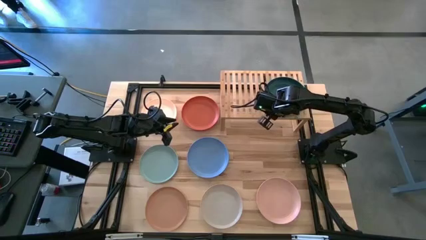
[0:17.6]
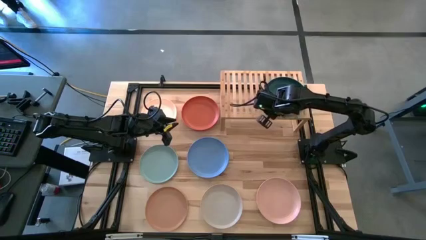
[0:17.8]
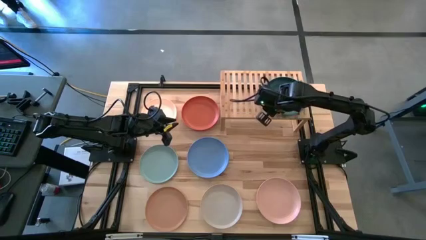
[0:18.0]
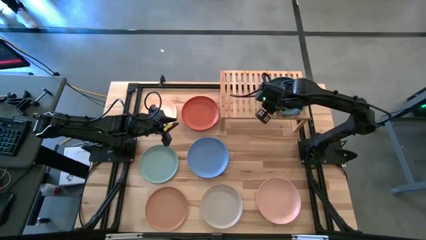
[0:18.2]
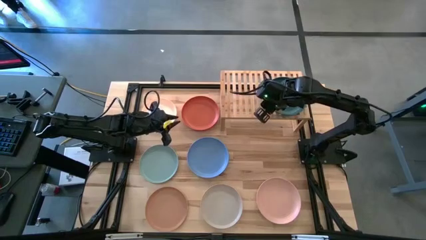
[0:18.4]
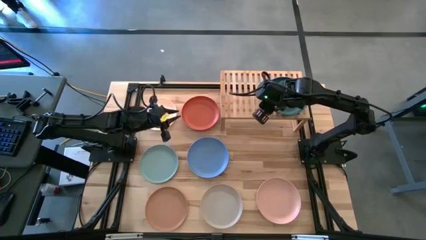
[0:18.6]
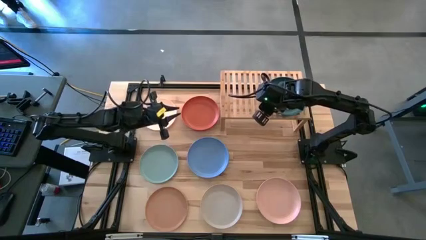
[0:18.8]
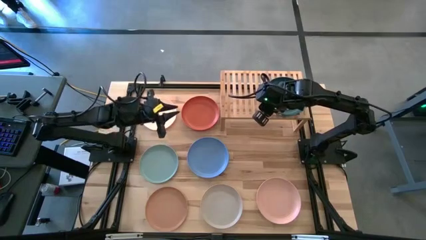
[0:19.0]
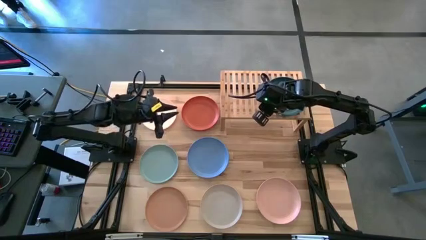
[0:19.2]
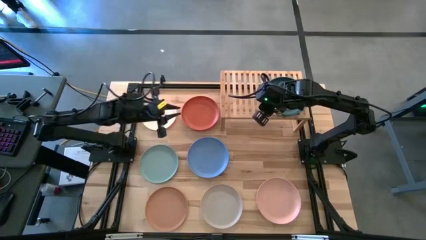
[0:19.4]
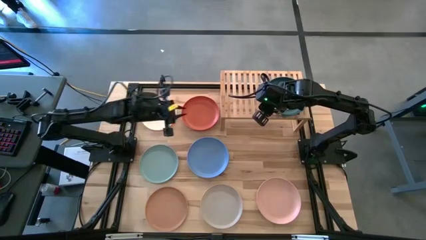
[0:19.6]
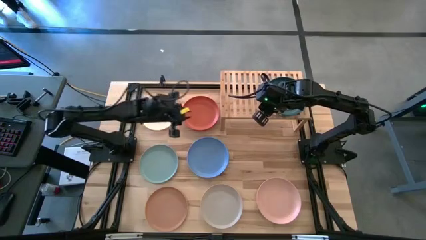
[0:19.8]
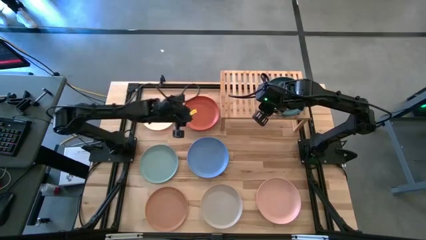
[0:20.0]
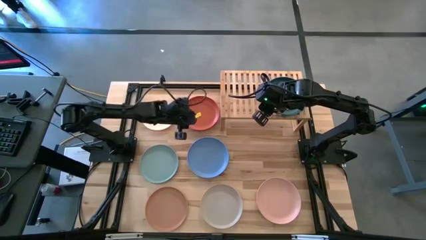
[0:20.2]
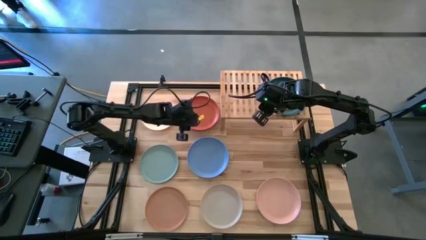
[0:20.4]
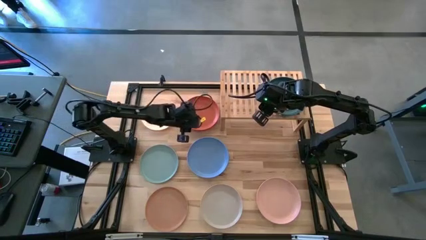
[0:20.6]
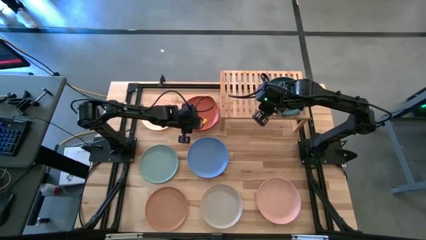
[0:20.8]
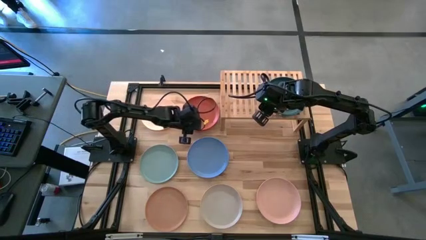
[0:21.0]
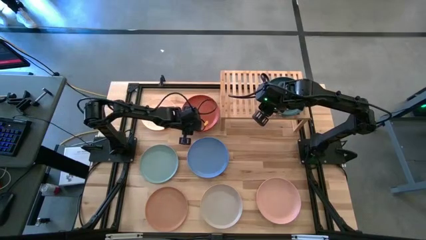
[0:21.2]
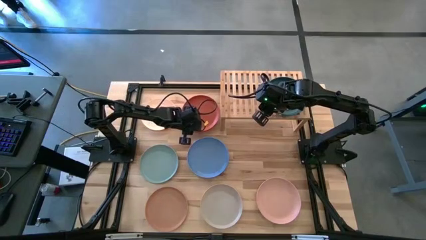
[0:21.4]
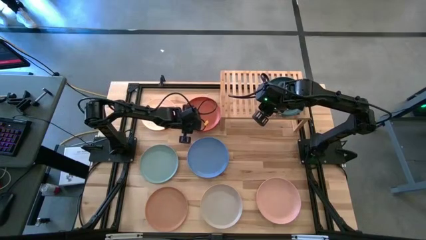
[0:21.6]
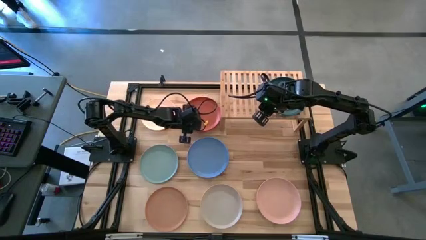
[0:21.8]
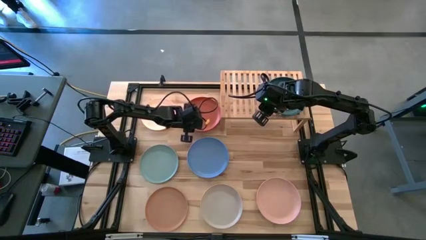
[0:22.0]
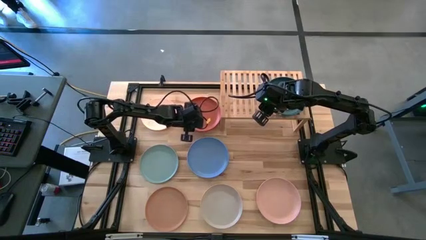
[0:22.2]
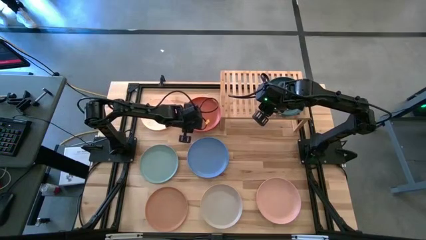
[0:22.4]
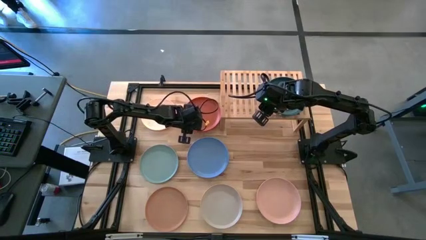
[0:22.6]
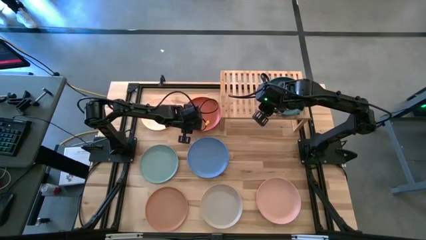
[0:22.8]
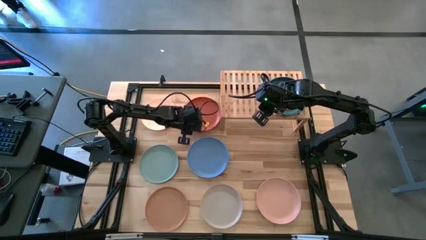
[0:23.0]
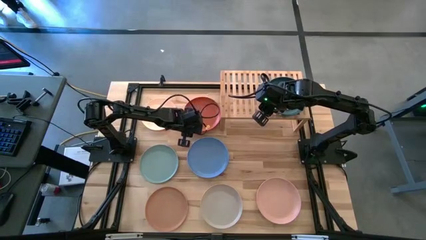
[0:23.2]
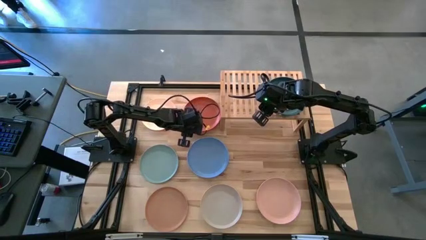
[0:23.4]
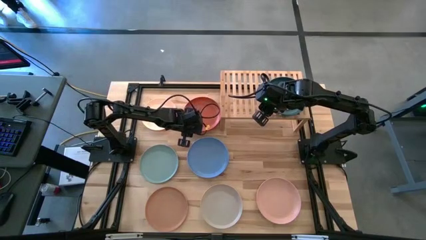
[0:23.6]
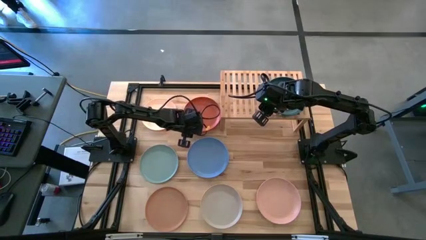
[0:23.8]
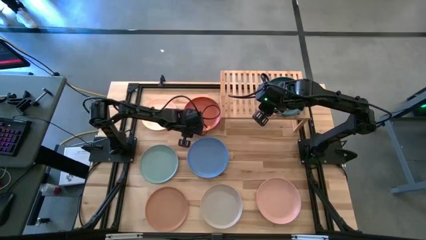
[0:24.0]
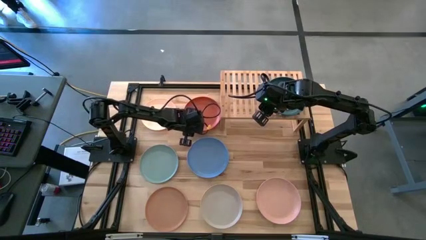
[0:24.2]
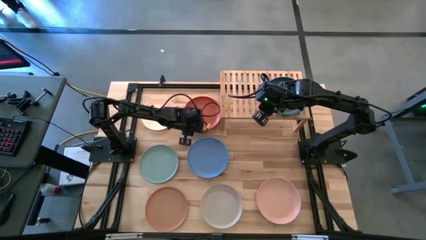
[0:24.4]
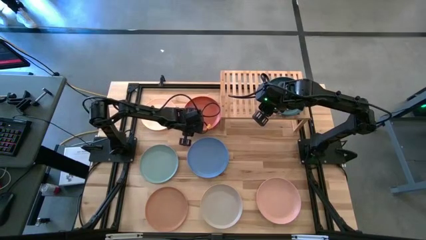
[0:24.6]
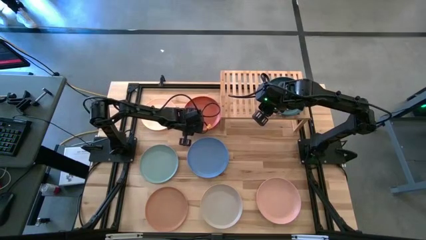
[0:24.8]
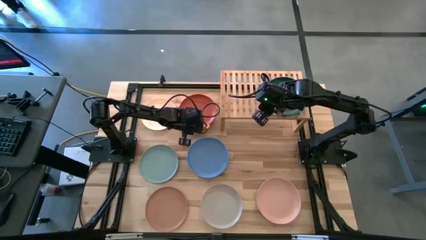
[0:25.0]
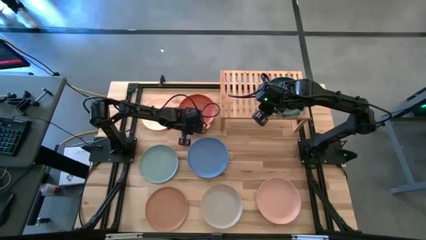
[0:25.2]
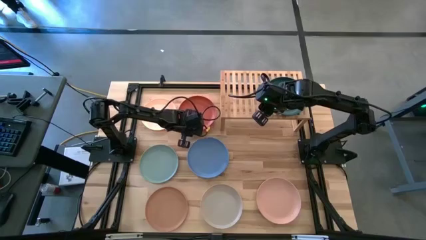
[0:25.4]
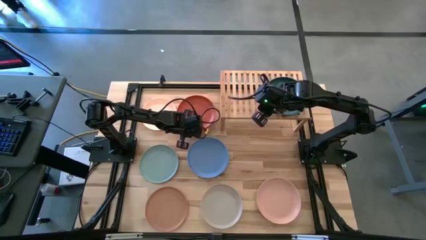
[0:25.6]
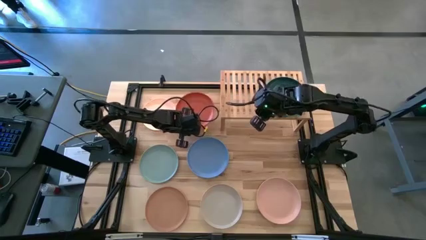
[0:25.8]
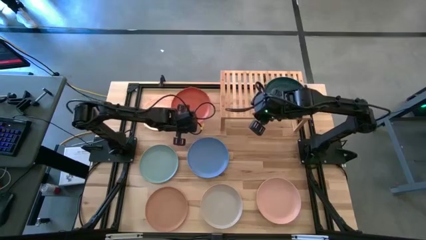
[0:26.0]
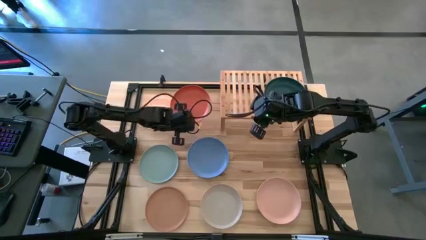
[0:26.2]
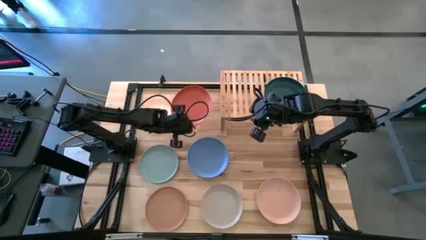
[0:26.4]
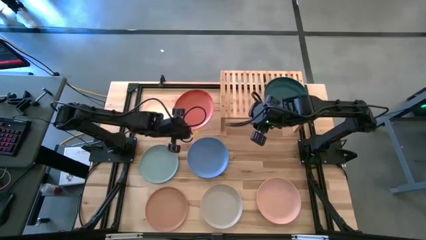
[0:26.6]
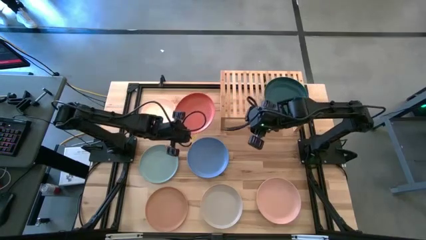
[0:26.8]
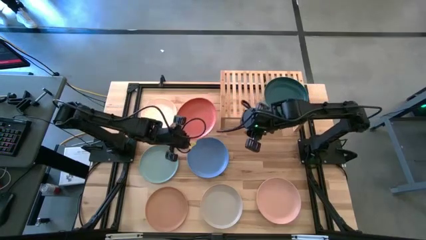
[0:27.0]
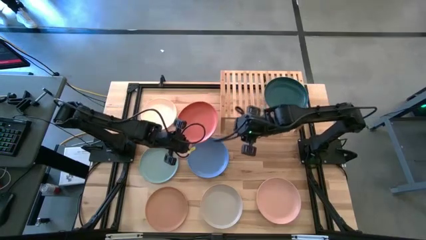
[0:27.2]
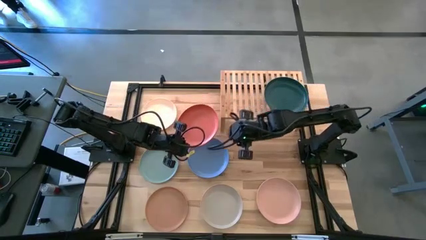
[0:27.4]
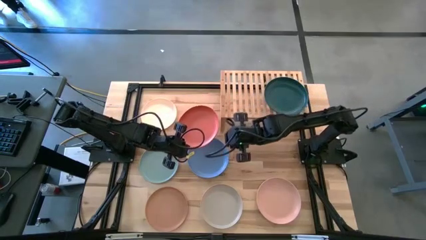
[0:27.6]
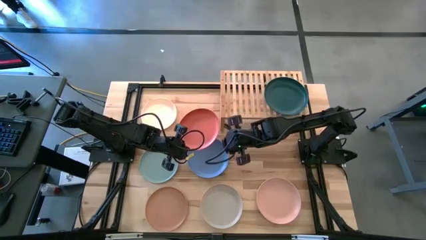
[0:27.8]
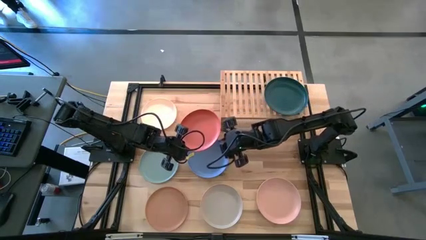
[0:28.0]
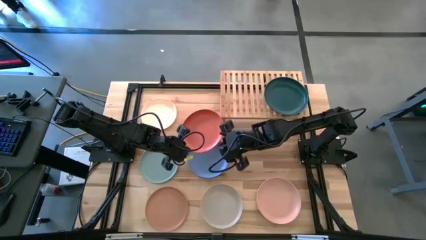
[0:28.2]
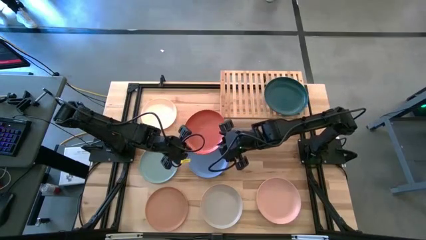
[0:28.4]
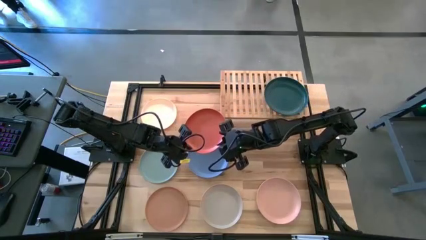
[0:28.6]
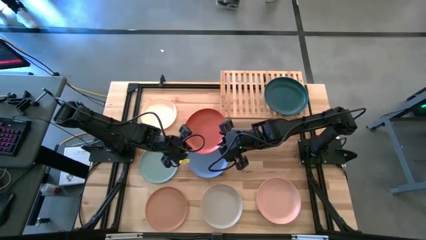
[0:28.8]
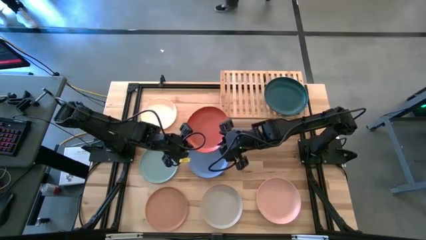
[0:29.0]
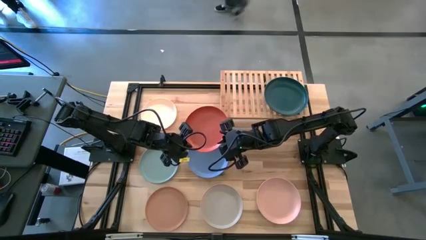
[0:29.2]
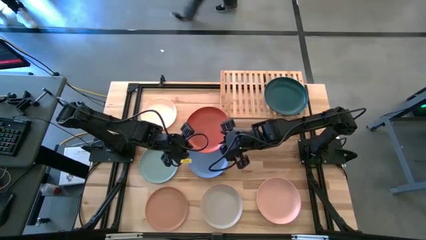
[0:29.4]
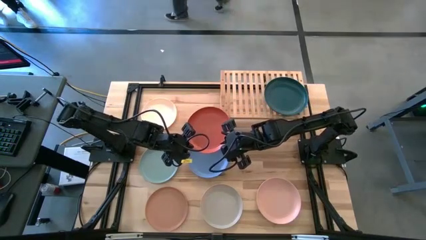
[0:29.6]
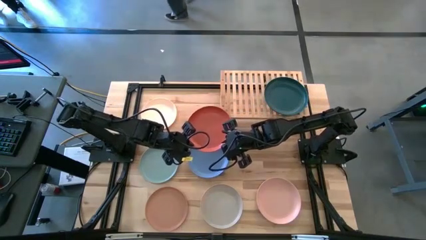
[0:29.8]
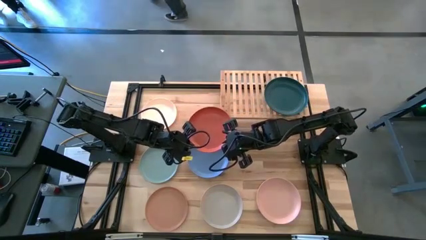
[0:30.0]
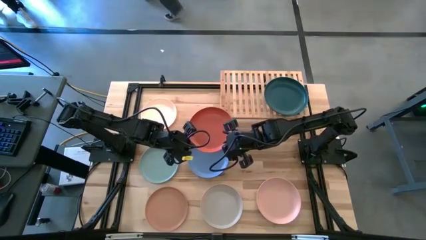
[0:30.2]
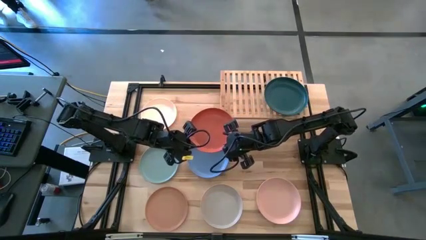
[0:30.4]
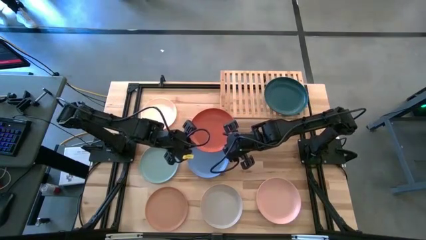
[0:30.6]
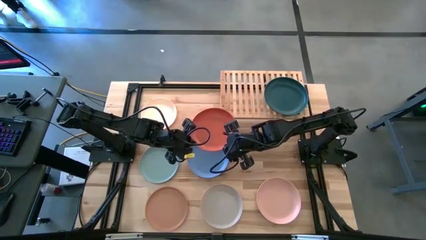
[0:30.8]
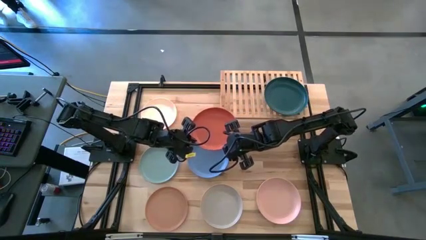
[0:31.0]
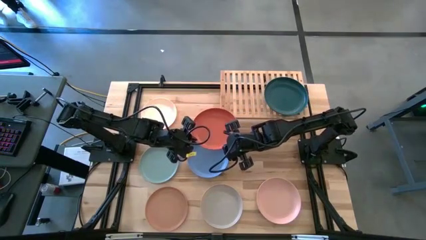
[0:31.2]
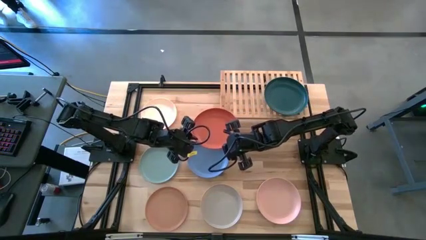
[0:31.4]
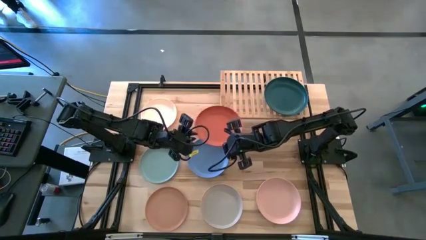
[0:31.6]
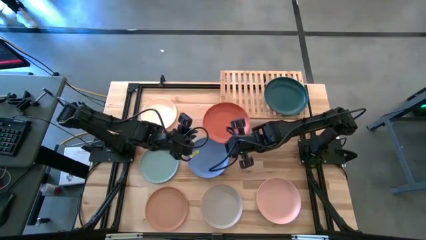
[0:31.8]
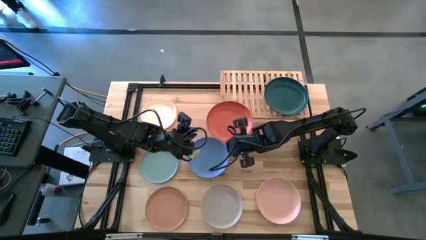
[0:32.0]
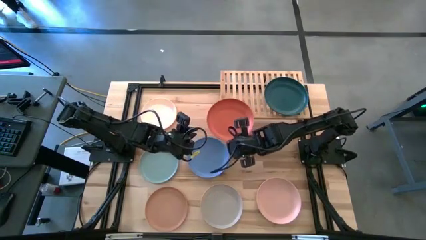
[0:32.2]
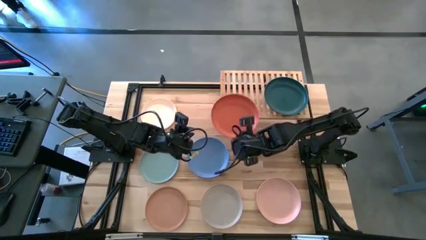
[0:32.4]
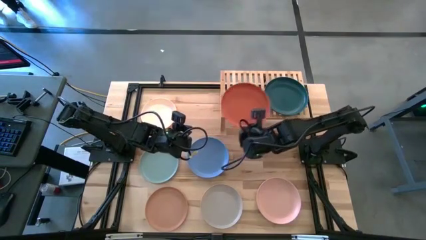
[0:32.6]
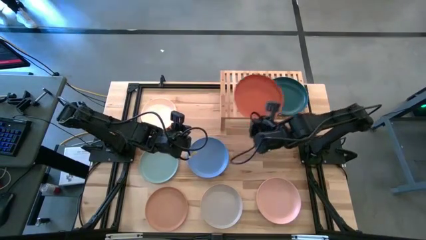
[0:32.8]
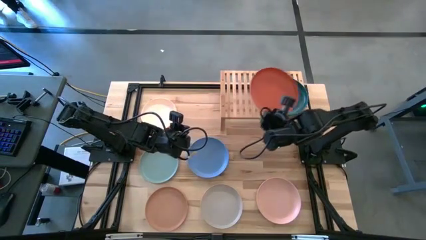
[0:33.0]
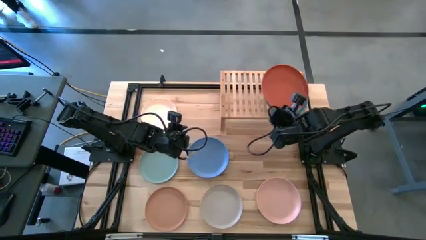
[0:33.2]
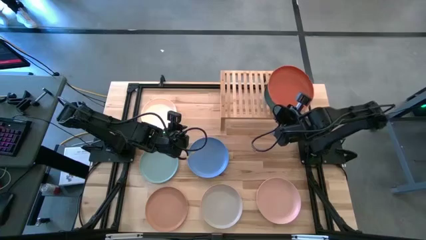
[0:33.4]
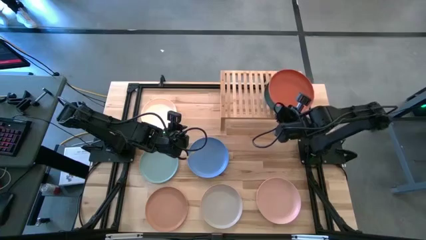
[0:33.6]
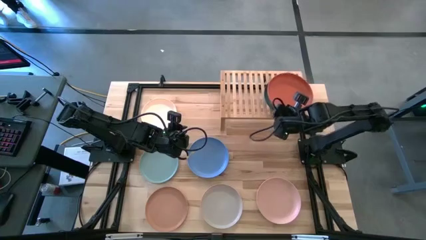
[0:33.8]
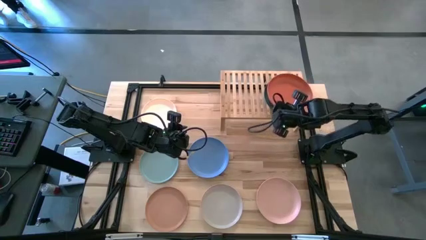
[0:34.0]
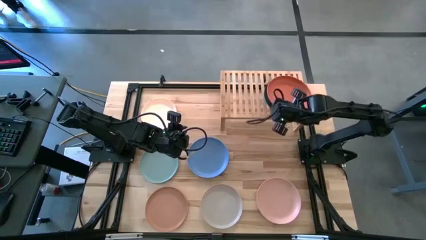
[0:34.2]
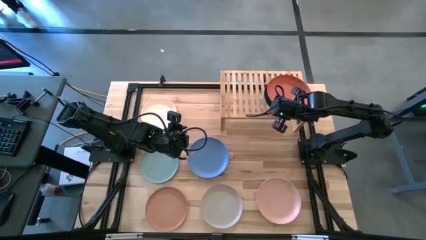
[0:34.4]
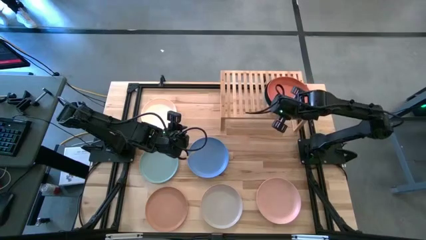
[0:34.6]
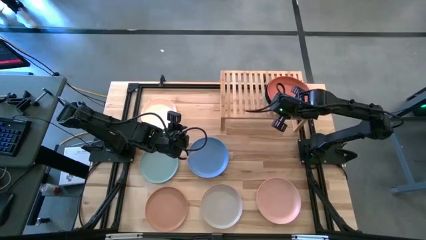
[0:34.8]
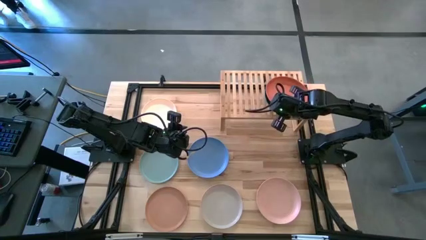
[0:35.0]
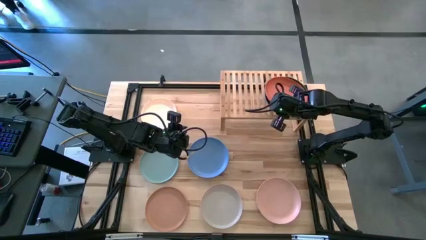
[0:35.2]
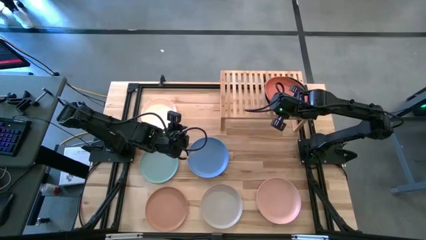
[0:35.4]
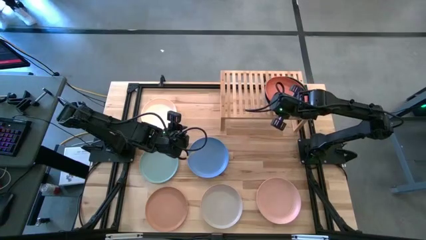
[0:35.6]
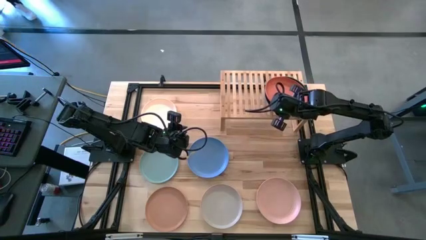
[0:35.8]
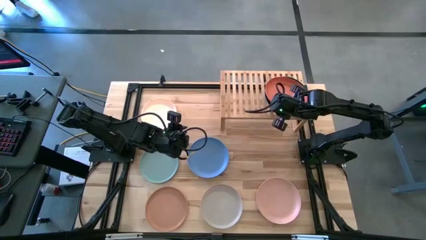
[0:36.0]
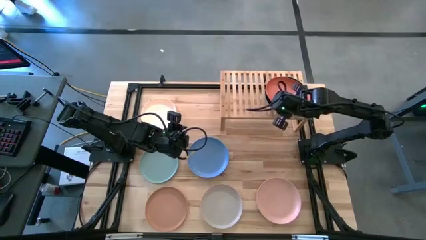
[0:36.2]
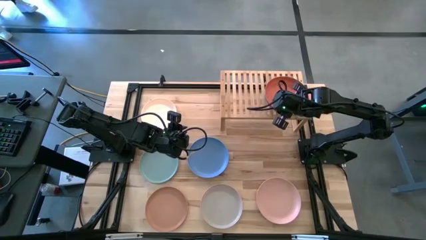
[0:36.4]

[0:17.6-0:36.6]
Task: Place and stack plates onto a shelf
Stack the orange plate on top of the dark green plate on the shelf
